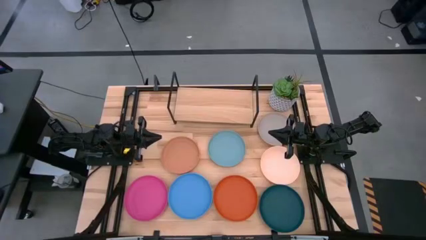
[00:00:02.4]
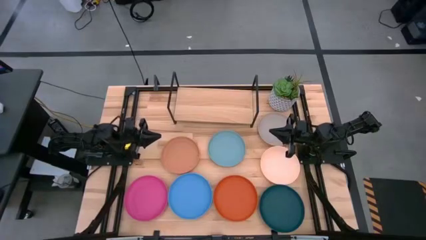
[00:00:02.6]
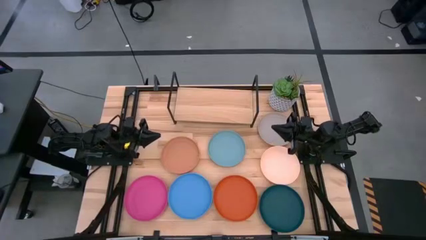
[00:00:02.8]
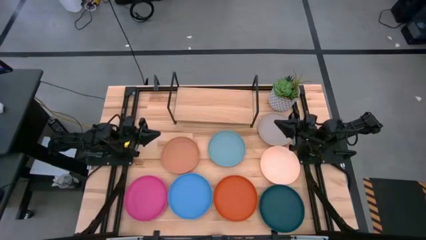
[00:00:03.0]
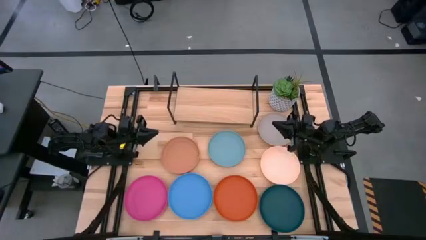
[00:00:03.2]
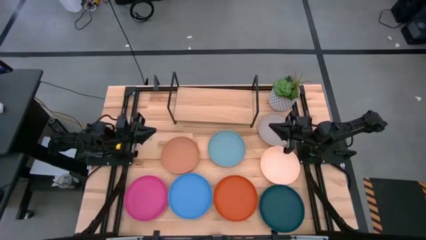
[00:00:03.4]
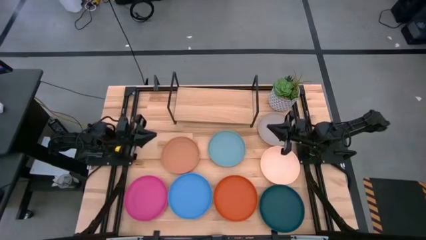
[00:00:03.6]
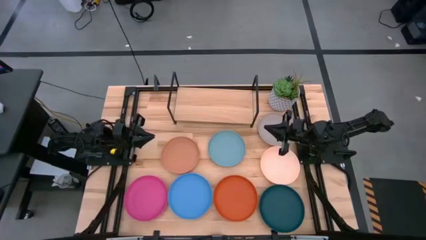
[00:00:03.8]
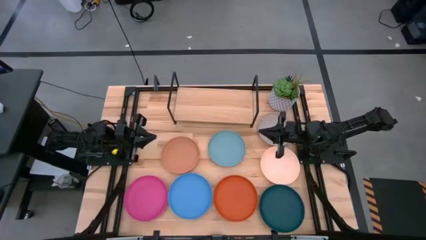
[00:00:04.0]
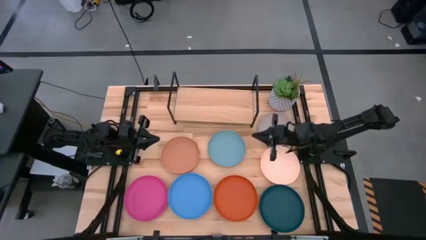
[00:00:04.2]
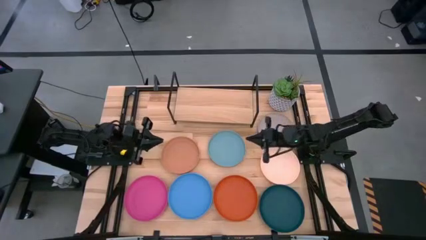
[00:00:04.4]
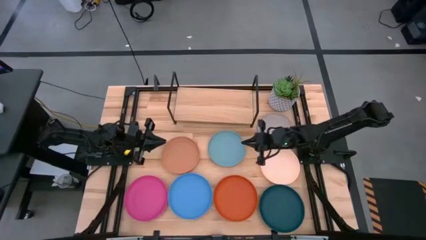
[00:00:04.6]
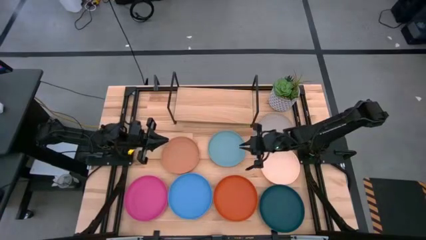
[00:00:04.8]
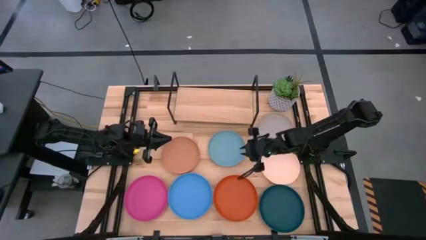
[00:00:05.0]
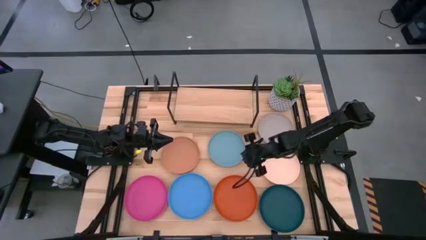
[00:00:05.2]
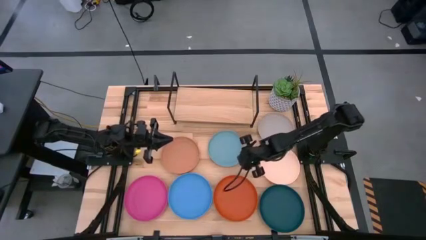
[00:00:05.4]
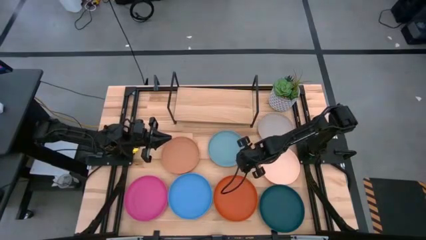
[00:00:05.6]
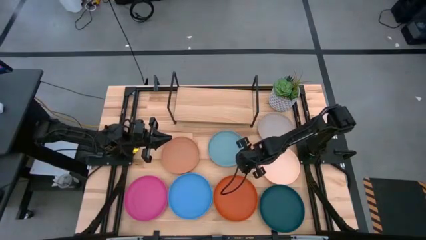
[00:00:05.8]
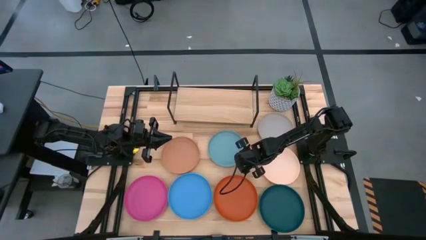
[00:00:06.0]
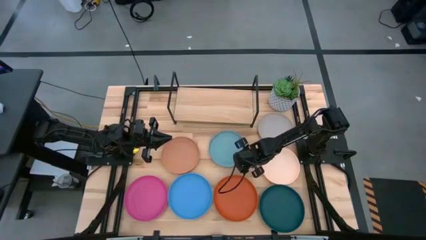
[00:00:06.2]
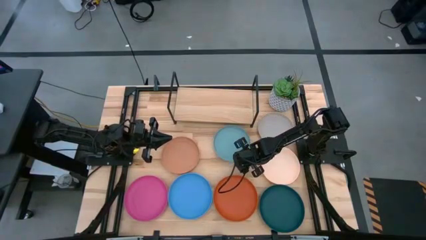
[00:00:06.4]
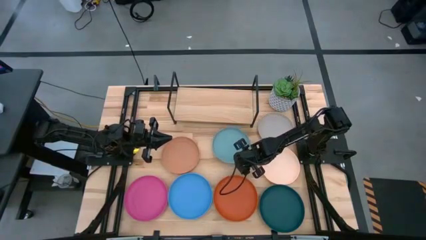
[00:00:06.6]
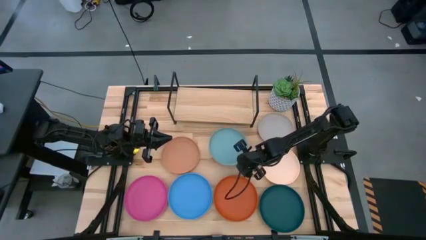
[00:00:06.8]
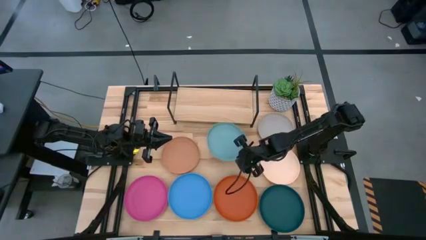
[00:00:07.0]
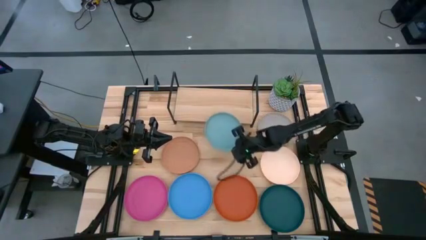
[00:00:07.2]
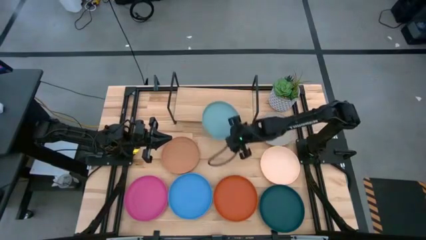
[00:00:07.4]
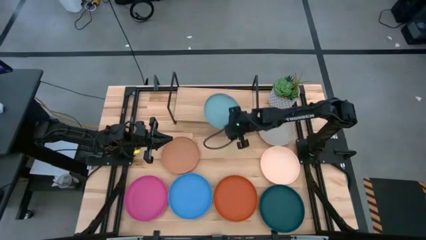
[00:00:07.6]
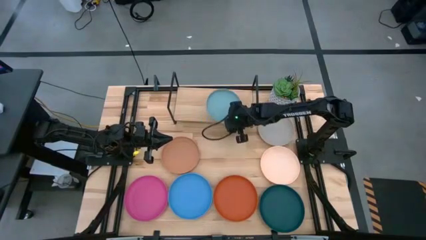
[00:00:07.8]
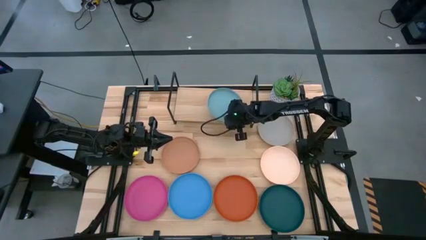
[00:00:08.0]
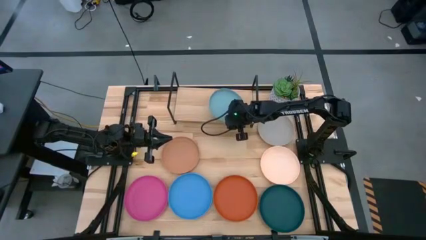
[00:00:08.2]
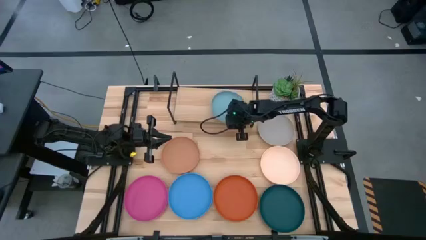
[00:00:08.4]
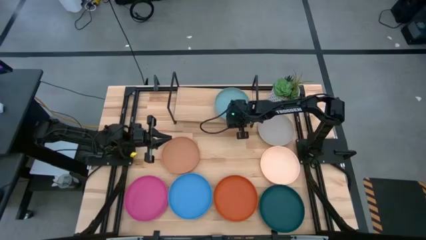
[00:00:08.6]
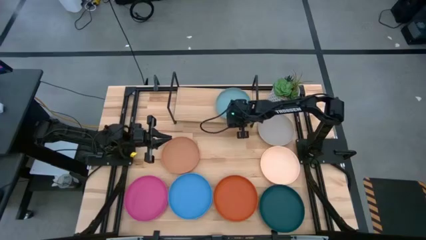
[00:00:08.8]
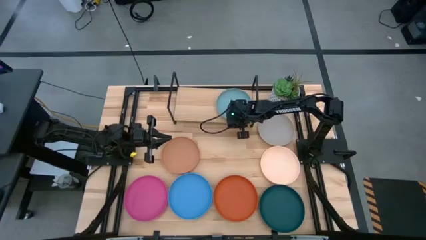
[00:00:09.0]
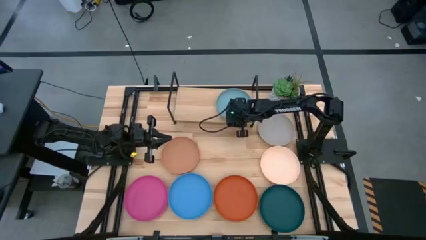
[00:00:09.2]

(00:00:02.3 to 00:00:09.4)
Task: Place and stack plates onto a shelf
Put the light blue plate on the shelf

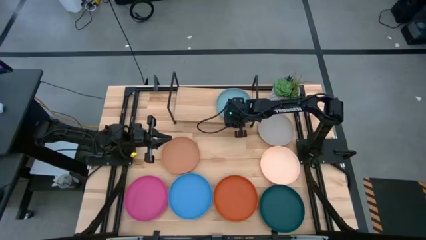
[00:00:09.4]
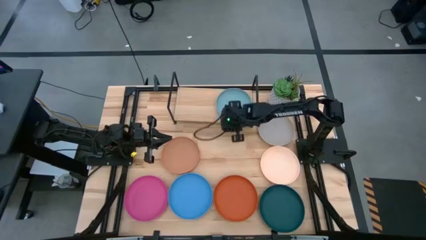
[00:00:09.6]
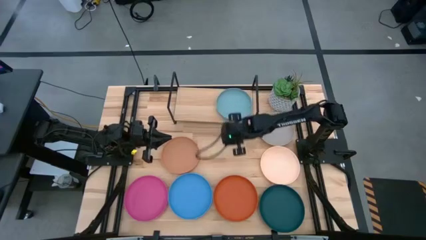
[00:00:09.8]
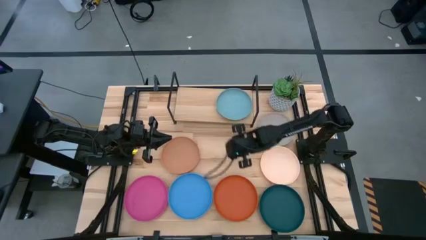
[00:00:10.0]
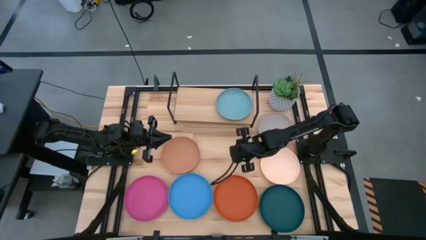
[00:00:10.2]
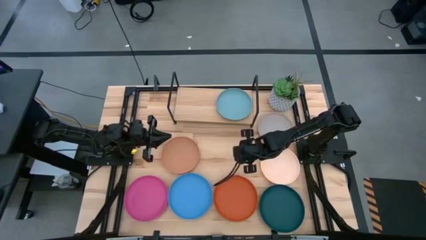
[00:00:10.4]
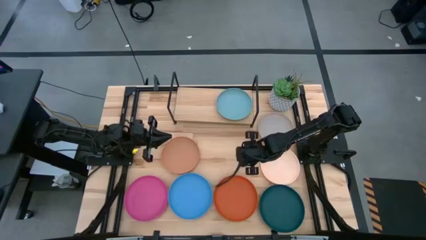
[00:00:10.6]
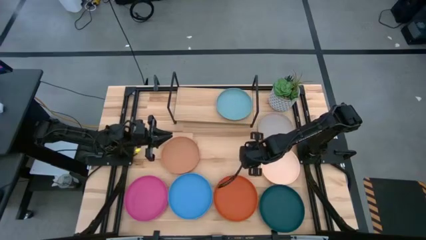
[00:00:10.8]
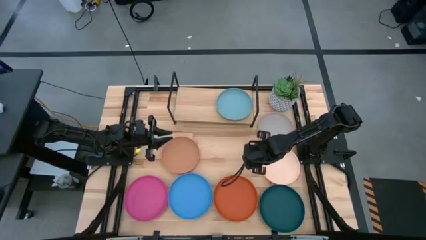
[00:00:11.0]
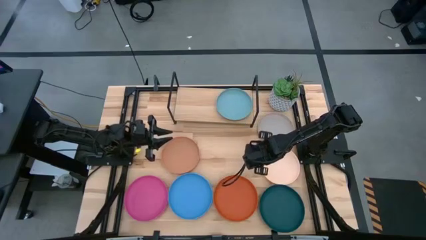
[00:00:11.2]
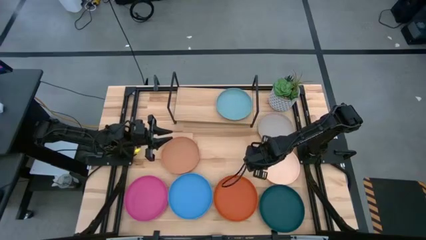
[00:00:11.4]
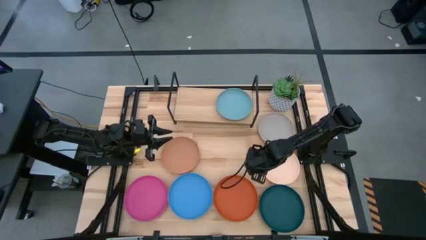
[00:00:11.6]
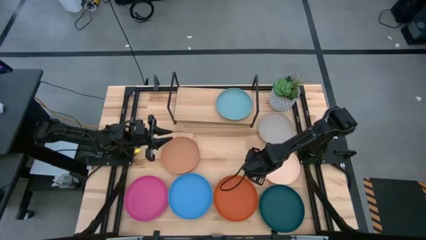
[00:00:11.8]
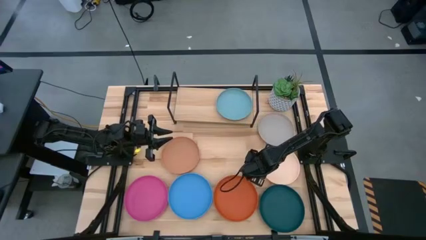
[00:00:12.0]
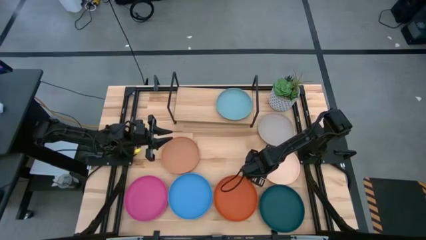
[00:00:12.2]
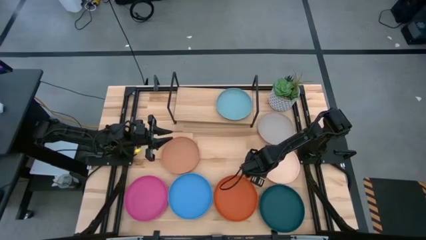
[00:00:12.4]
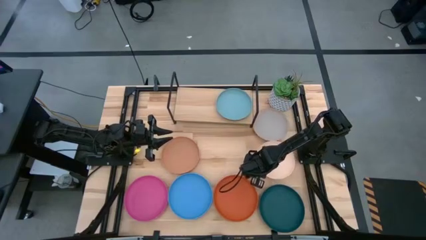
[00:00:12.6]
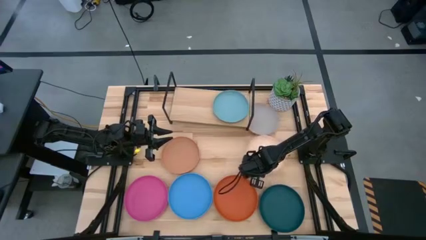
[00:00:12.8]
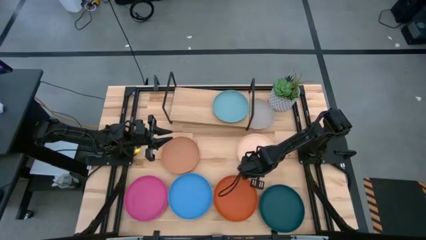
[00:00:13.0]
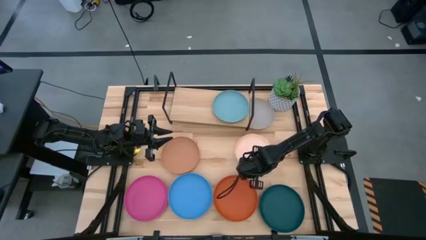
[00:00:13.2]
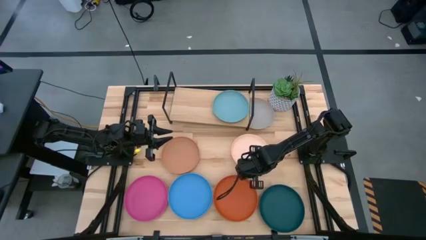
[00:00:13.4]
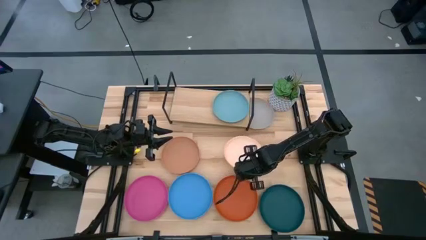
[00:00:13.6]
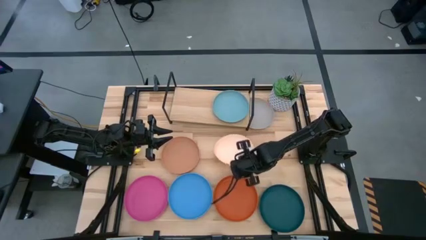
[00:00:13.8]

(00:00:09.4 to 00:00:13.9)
Stack the light orange plate on top of the light blue plate on the shelf

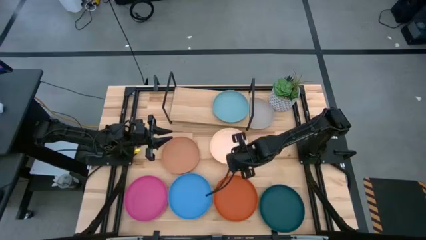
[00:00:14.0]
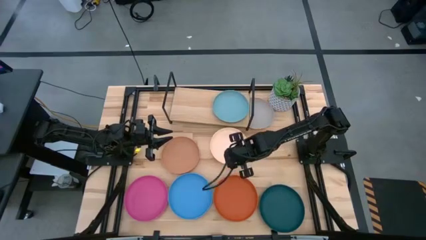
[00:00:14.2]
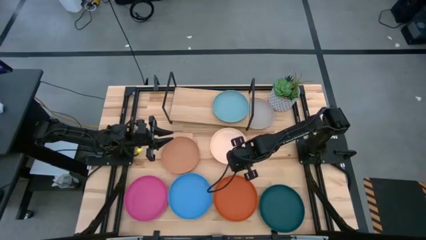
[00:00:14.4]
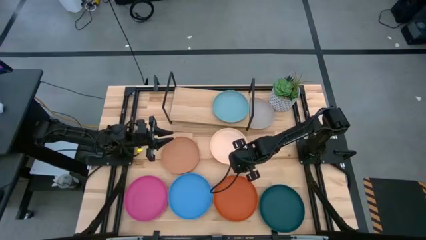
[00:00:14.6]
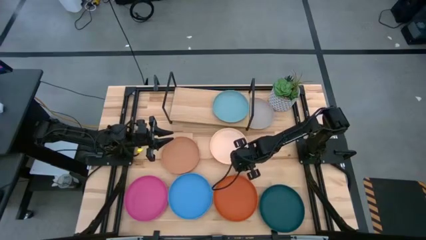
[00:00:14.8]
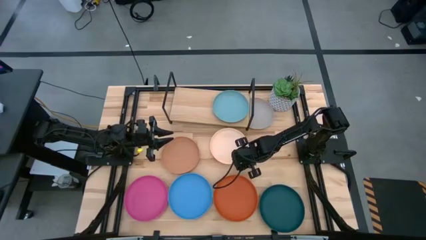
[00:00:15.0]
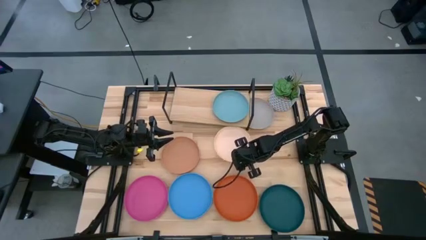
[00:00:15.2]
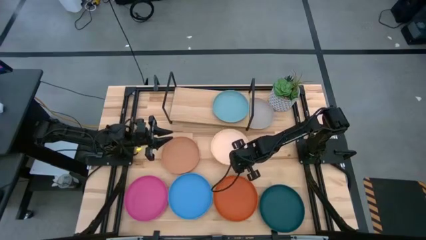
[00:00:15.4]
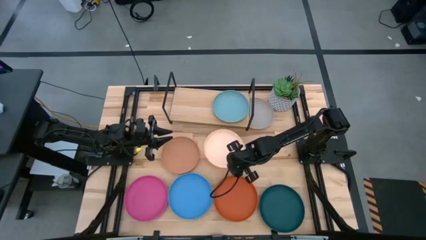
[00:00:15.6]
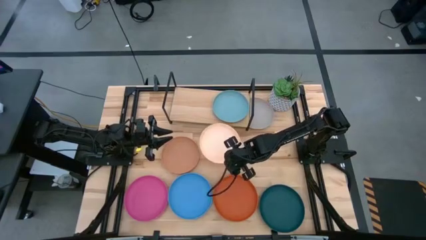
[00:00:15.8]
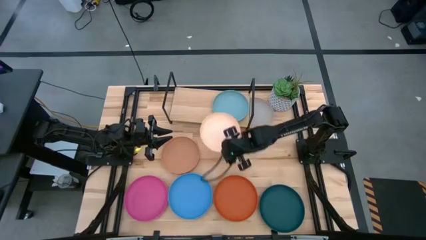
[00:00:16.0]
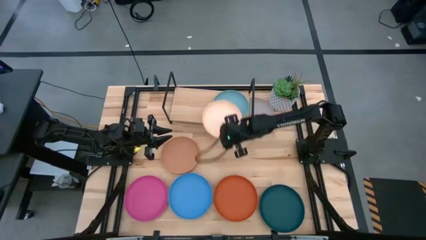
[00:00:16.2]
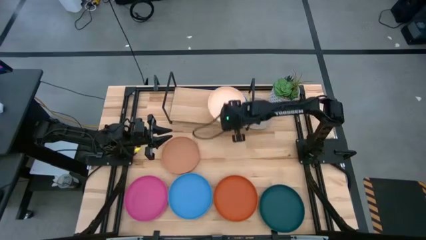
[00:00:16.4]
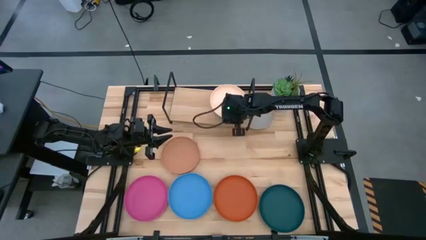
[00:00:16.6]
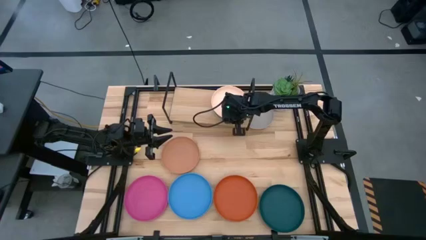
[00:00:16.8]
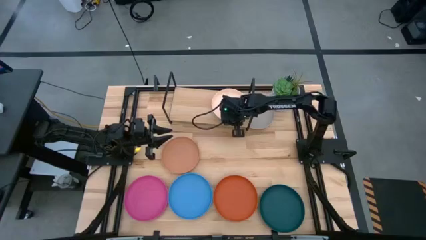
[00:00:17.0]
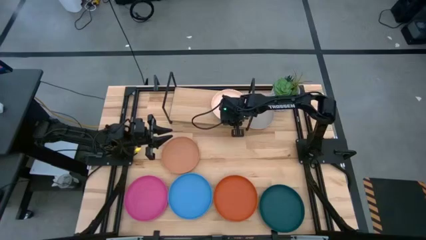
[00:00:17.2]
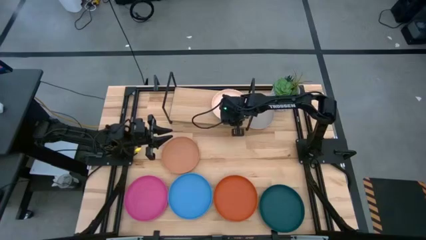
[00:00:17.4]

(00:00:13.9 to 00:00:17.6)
Stack the light orange plate on top of the light blue plate on the shelf
